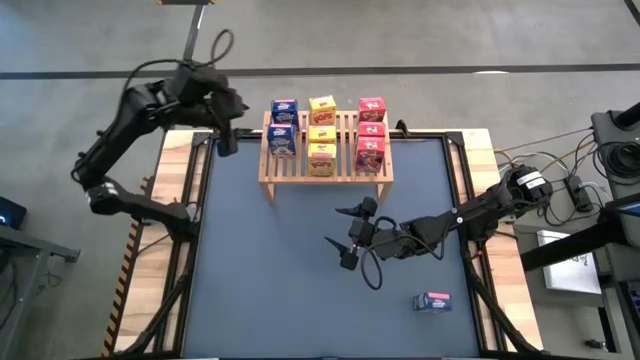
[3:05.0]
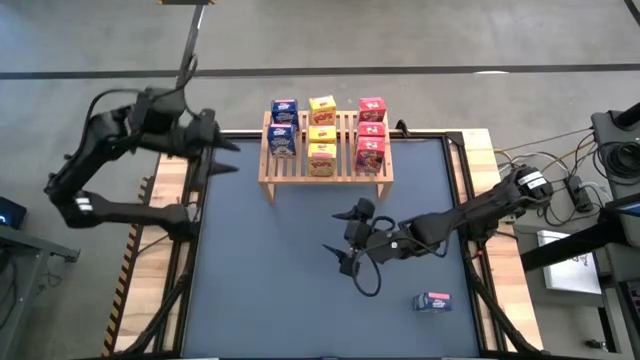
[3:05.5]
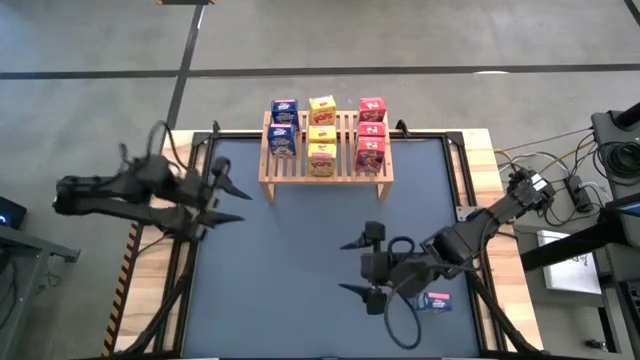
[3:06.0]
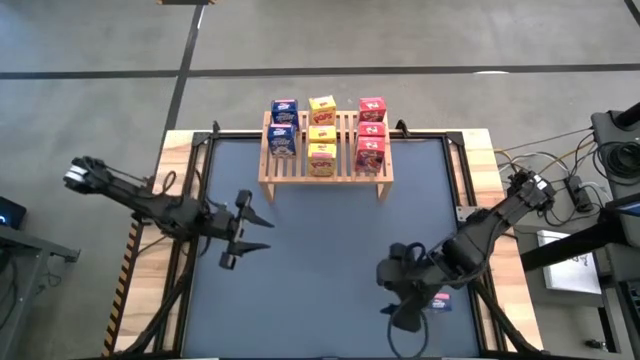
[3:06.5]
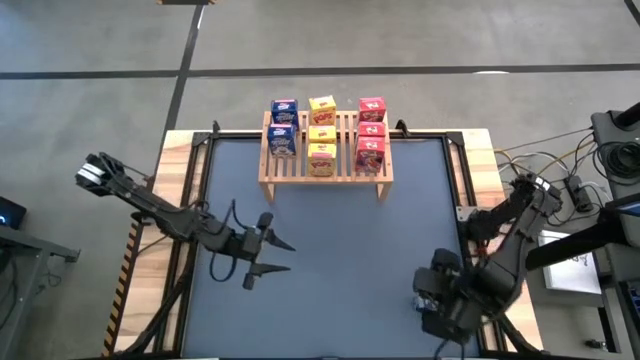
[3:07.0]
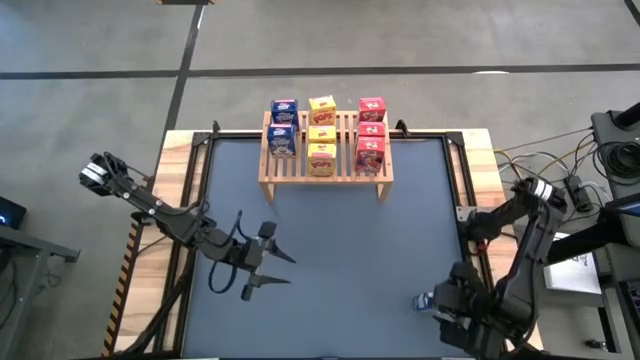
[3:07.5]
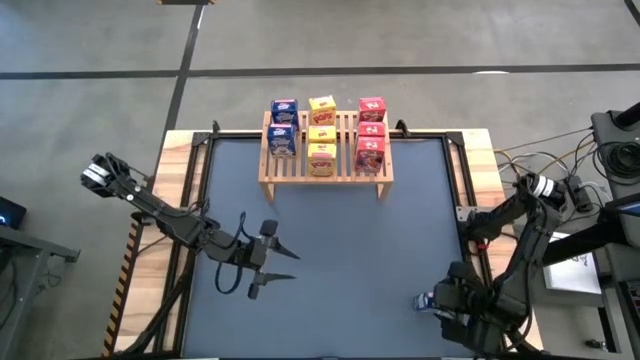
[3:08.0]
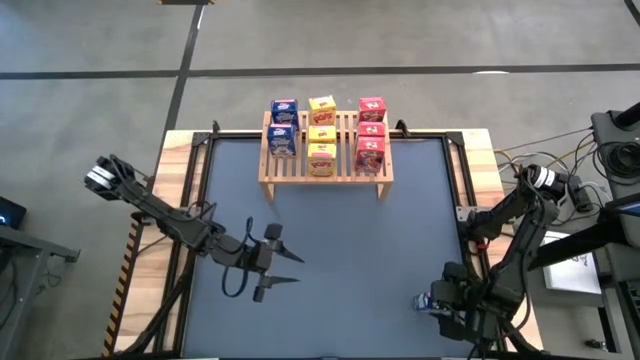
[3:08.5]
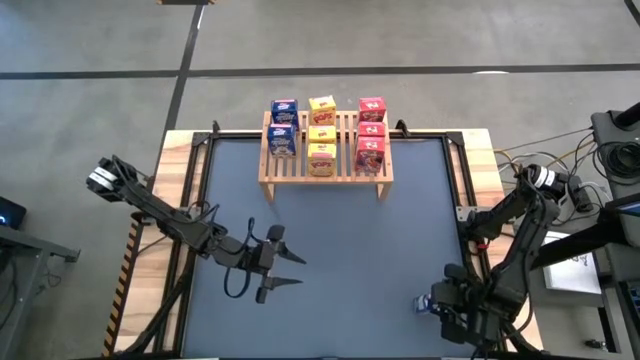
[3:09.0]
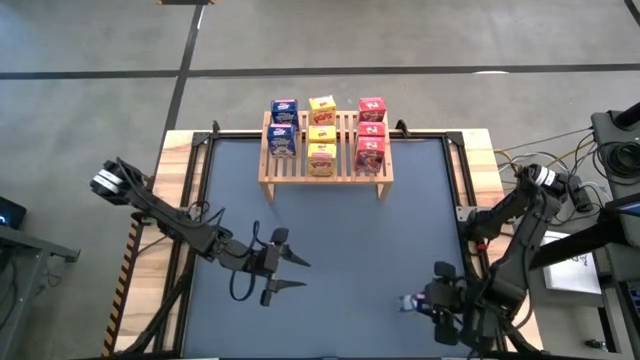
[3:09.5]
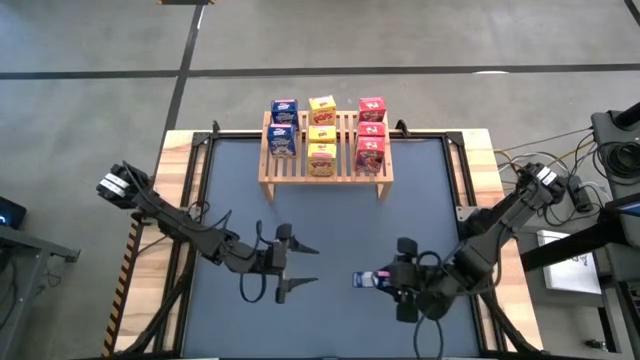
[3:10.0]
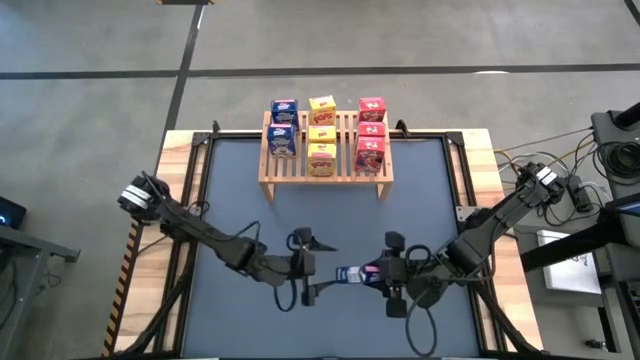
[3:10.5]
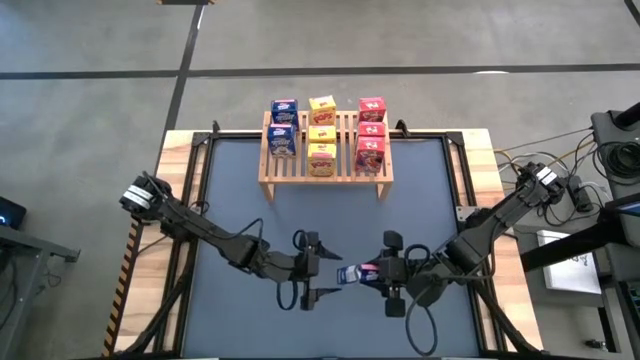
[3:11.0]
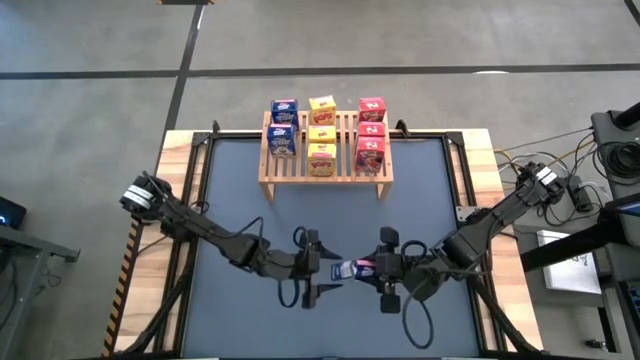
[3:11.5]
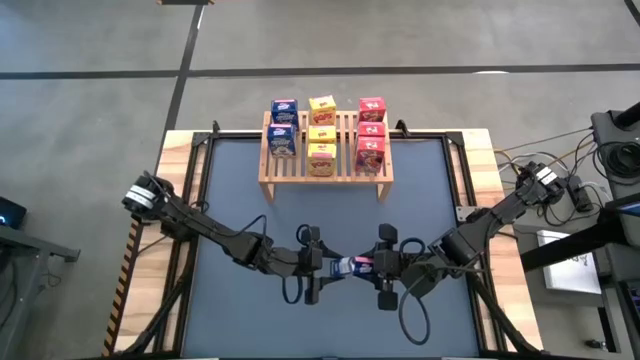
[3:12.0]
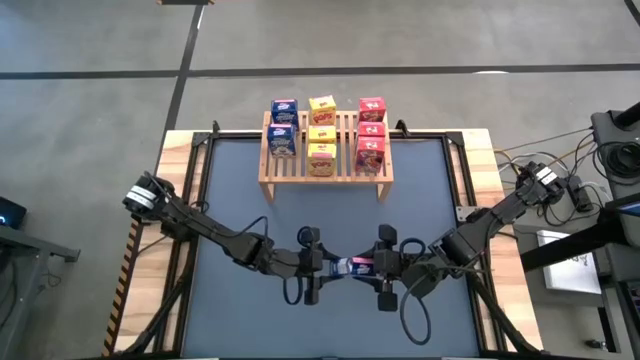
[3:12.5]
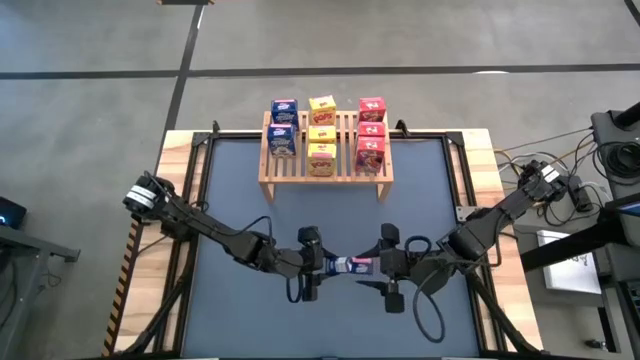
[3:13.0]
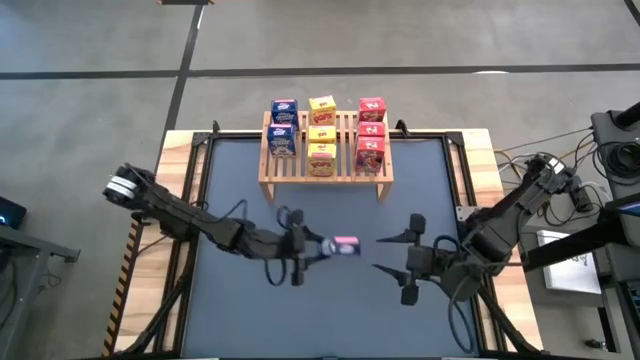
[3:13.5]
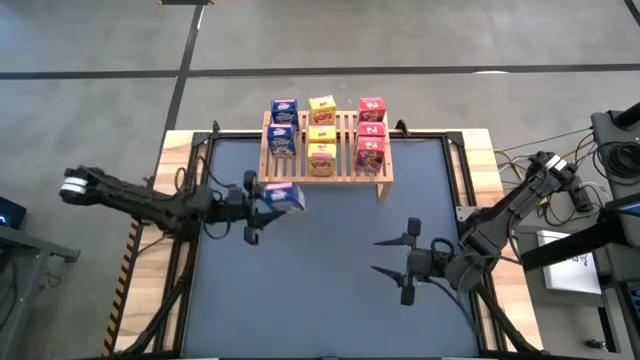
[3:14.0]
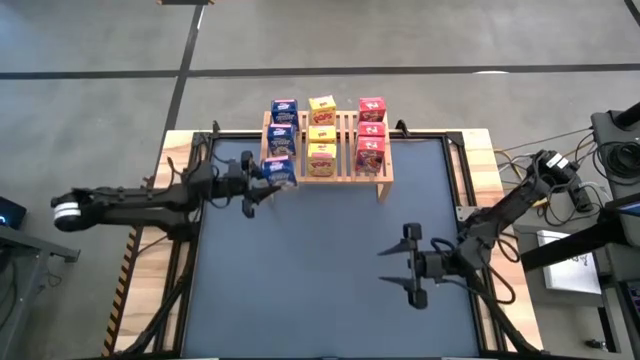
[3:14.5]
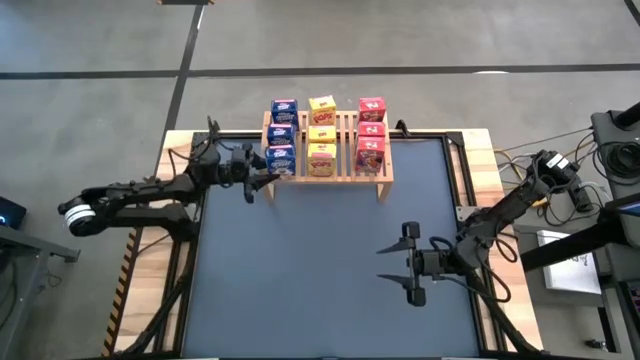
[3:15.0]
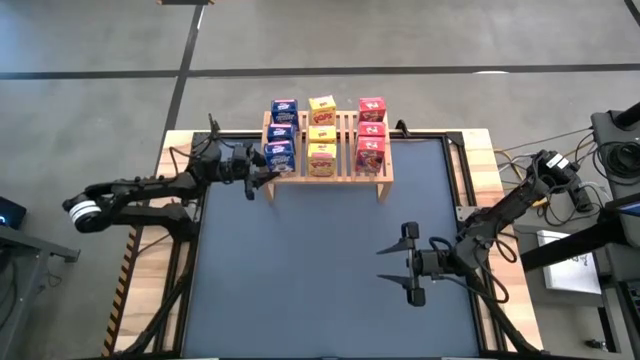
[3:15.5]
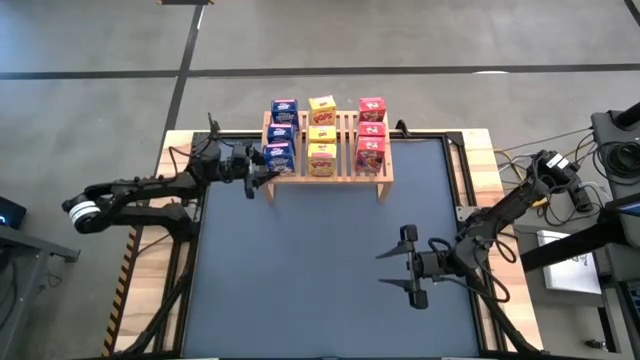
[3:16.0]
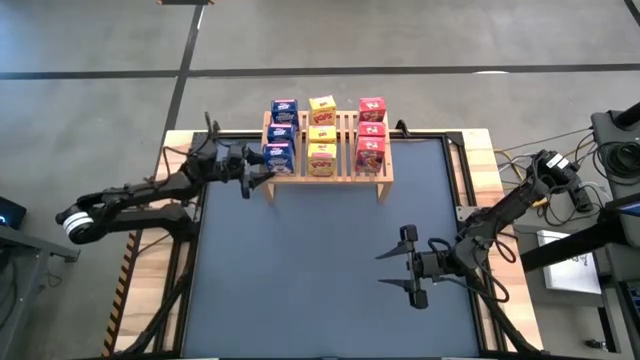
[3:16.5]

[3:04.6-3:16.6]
Task: Stack cereal on shelf
Put the blue cereal box on the shelf aligned with the blue cereal boxes

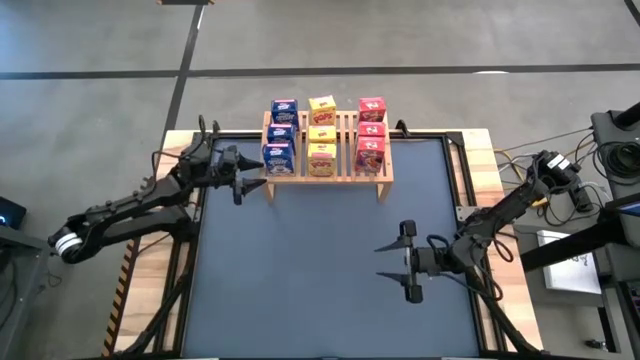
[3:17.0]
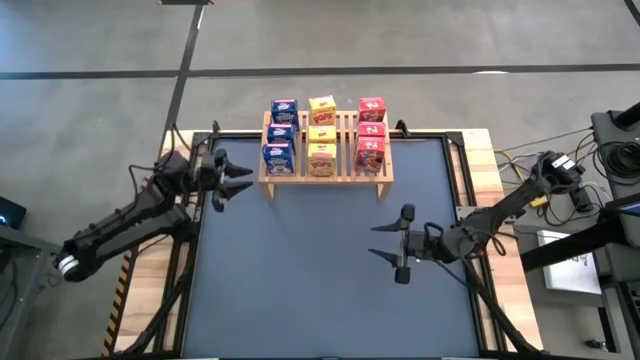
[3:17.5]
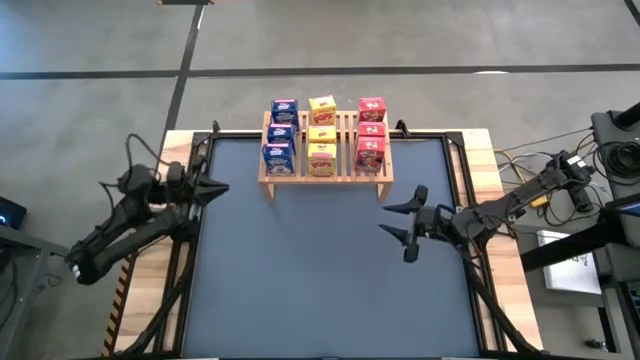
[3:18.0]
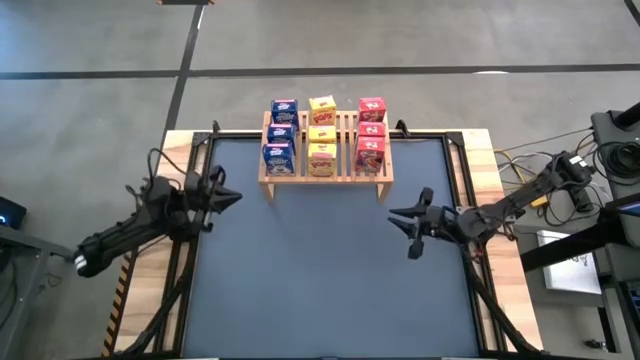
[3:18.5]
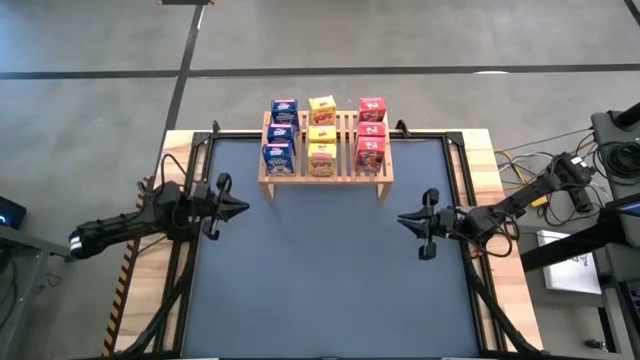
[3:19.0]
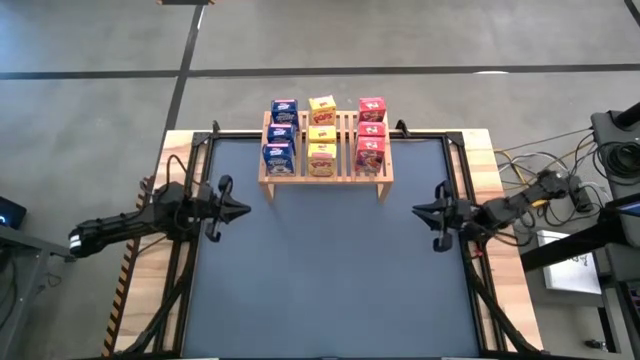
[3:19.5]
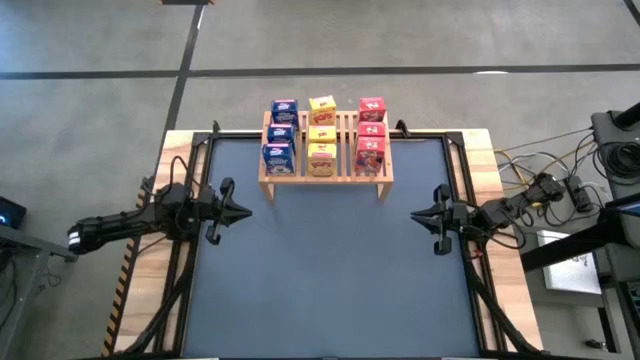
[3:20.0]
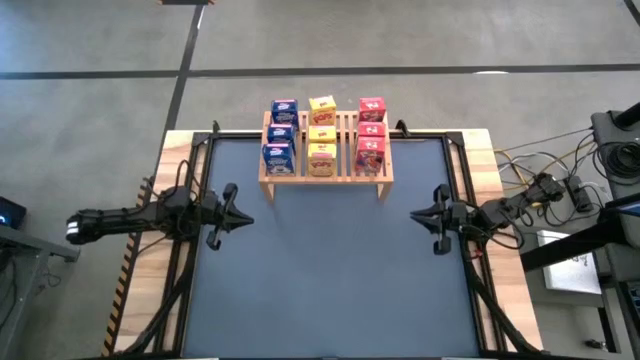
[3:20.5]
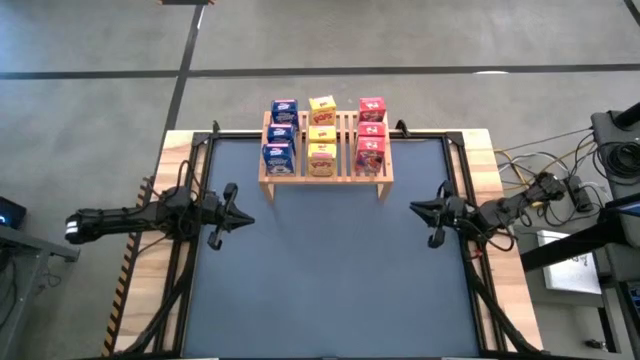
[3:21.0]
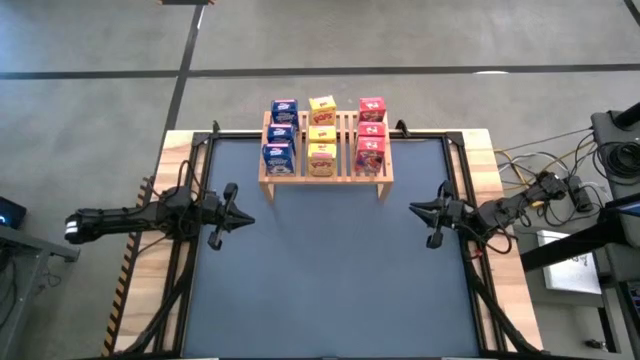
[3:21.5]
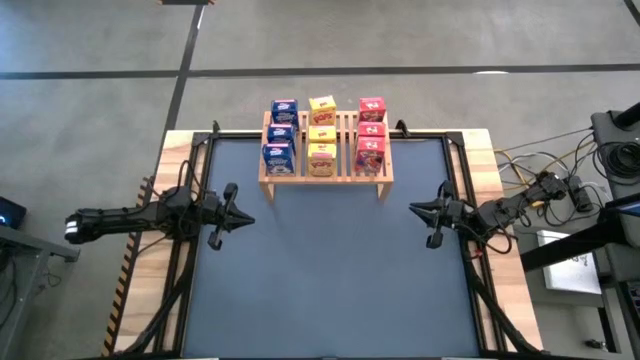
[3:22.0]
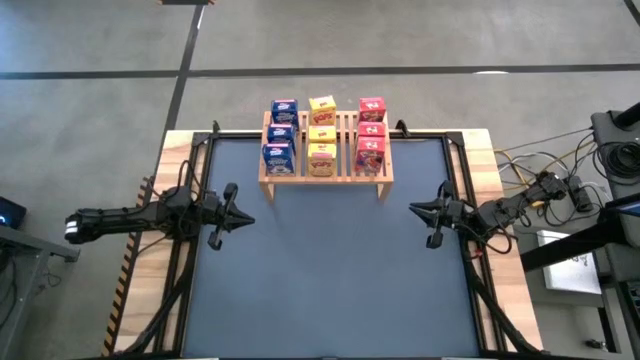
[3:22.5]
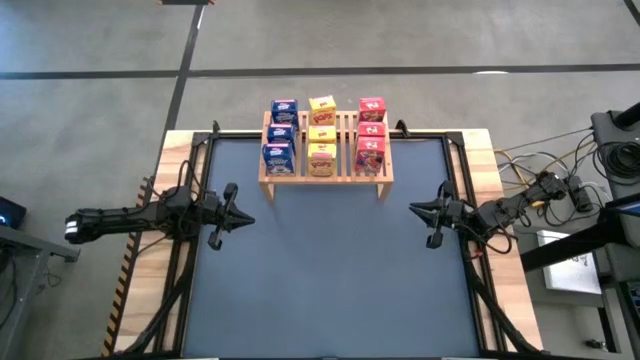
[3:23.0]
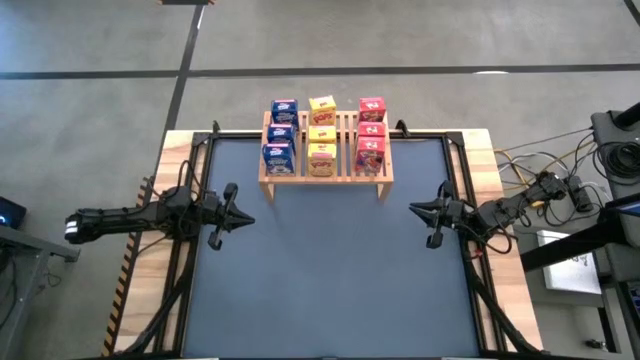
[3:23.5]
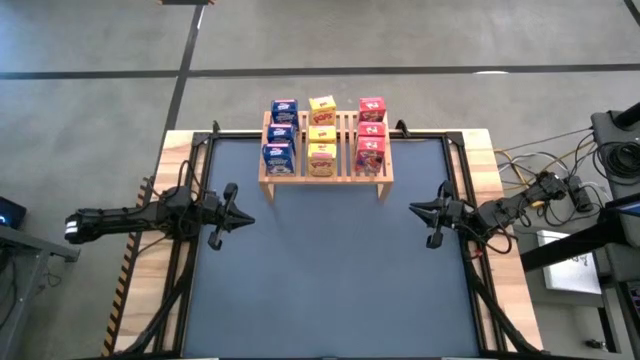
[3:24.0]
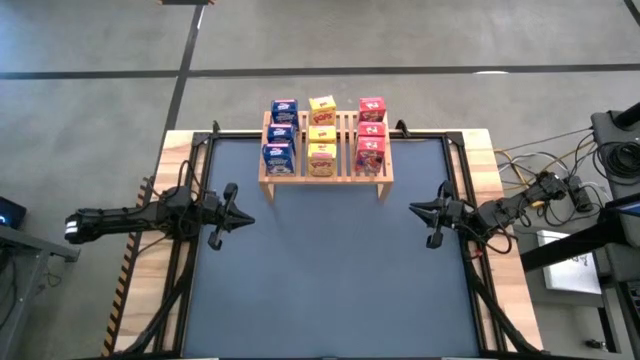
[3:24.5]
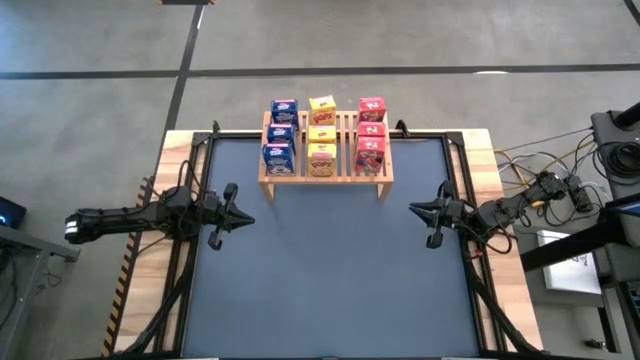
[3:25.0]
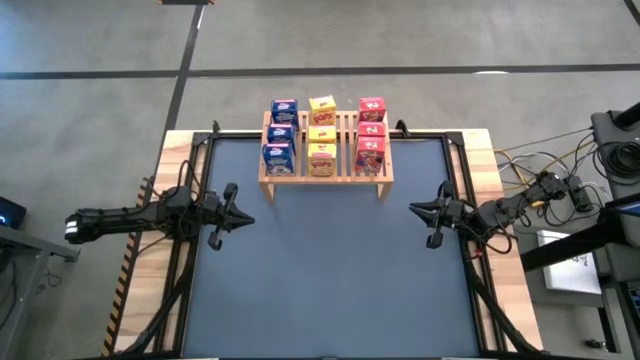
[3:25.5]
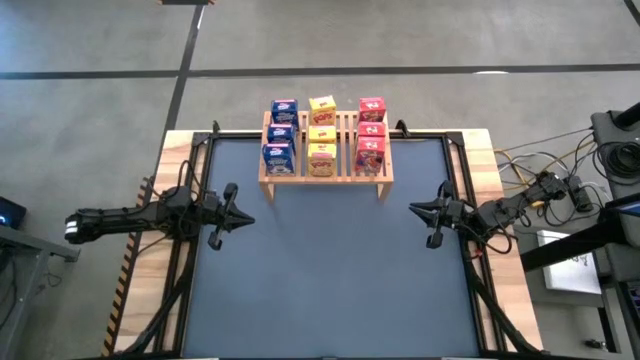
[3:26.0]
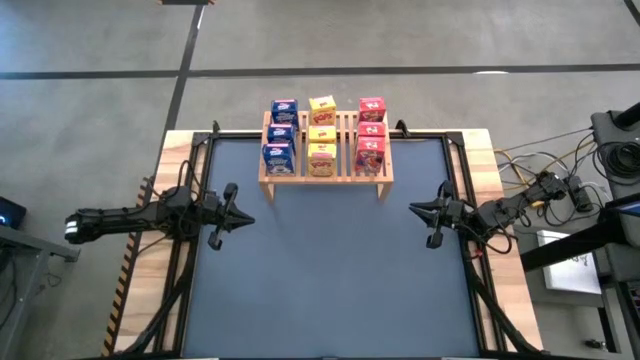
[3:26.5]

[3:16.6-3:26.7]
Return to Home Position
